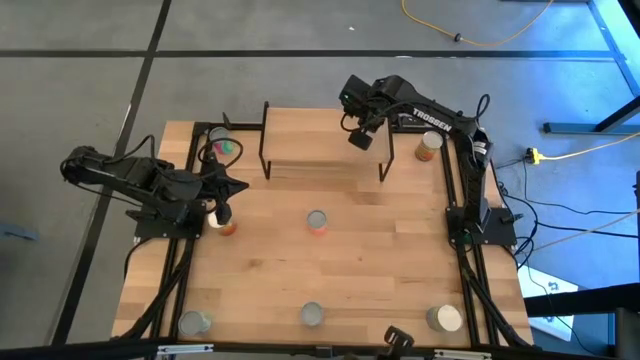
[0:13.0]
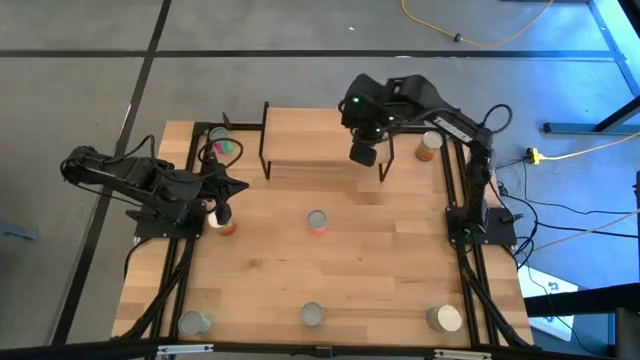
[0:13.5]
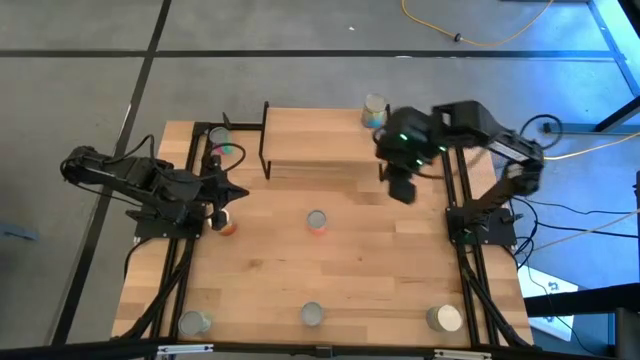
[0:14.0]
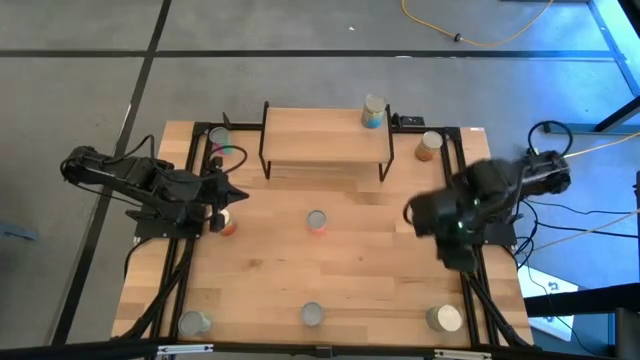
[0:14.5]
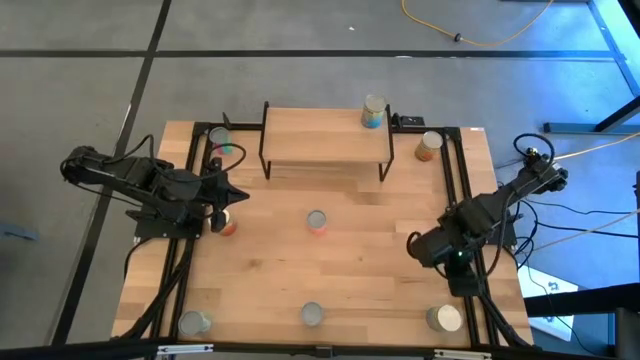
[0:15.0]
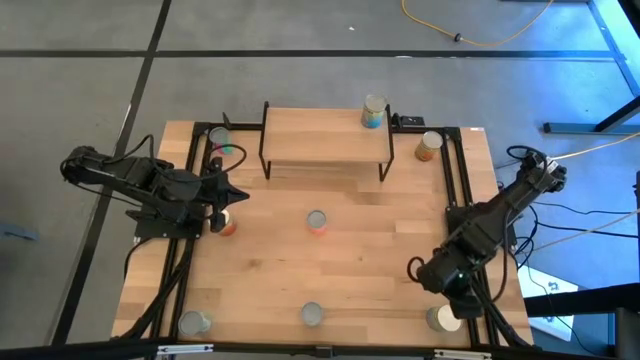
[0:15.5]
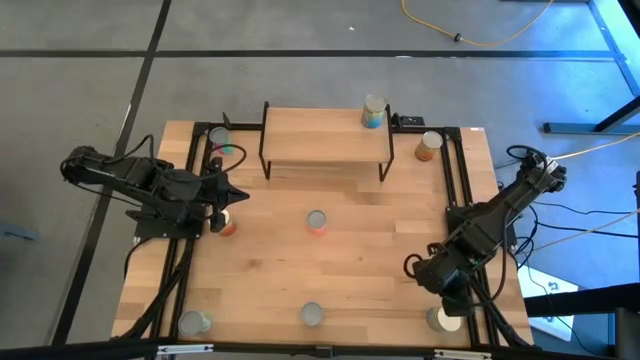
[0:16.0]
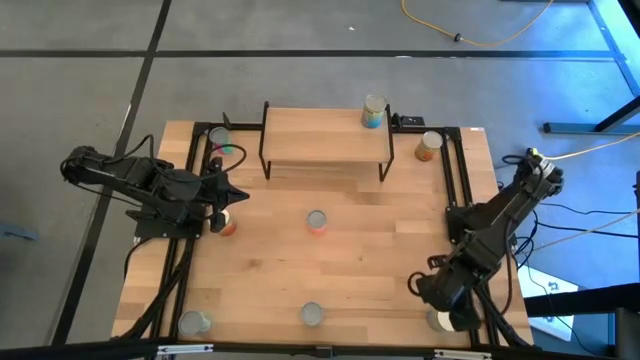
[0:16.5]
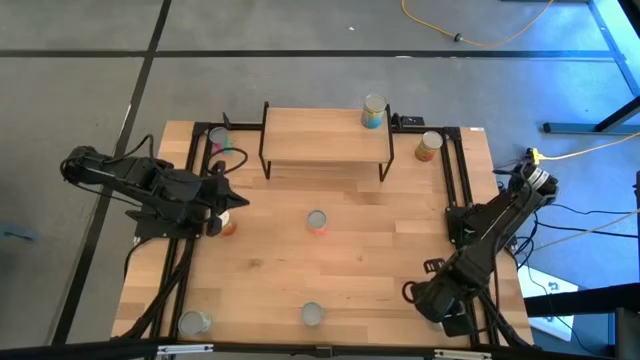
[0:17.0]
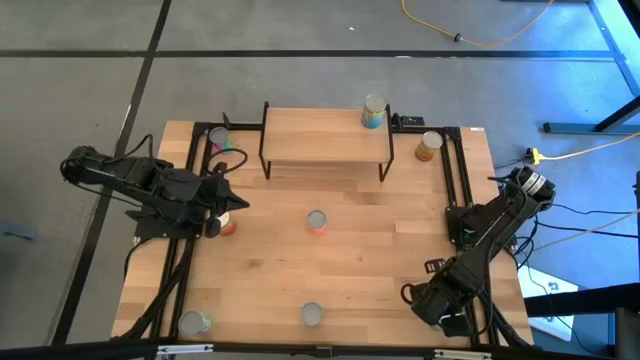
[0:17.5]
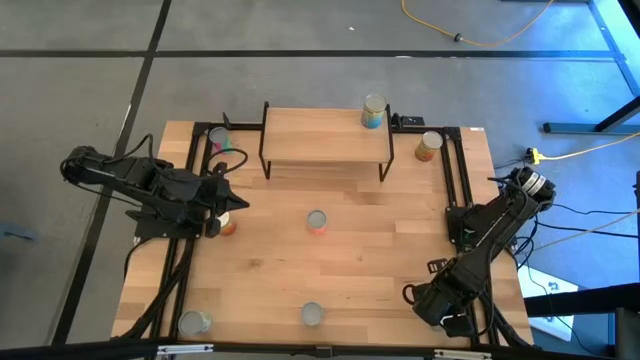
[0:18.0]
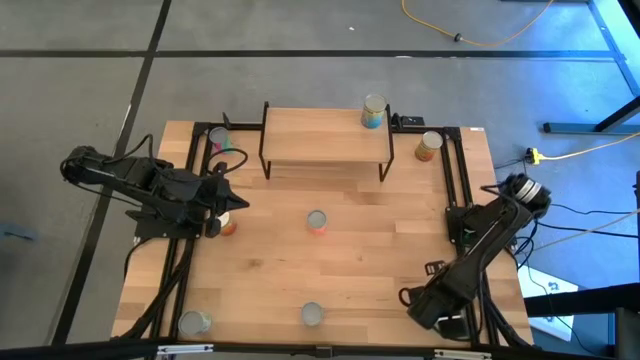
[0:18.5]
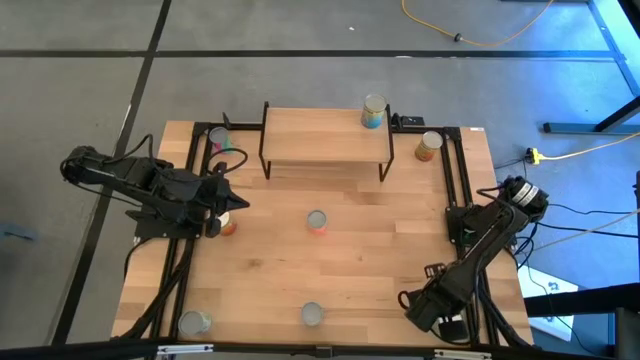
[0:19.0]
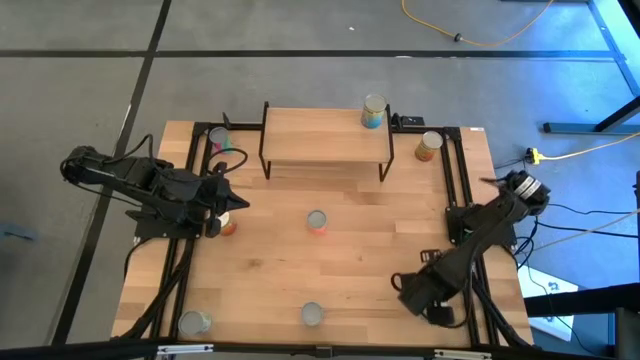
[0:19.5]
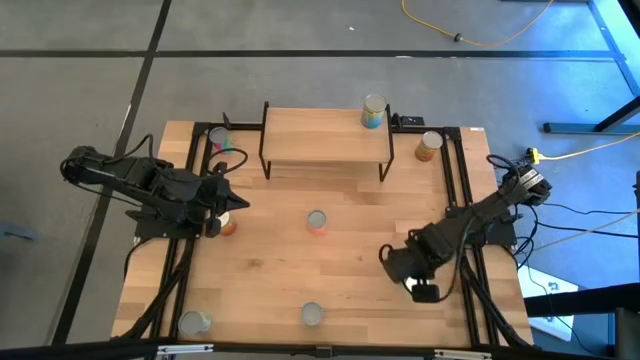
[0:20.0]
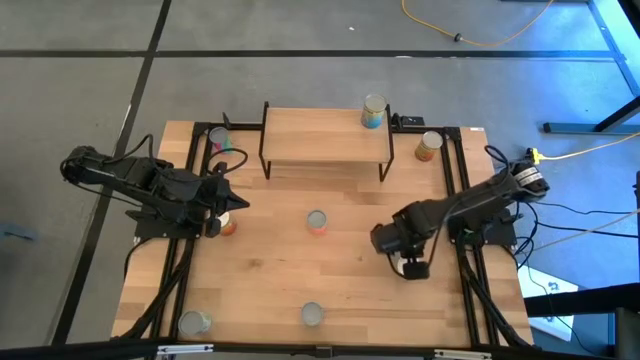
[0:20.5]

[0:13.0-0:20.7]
Task: Pick and place cans onto a shelf
Put the canned cherry on the shelf

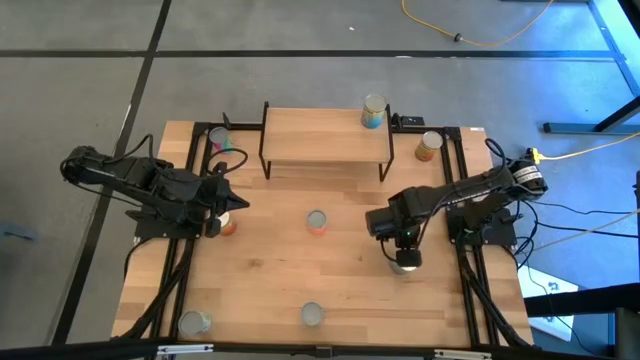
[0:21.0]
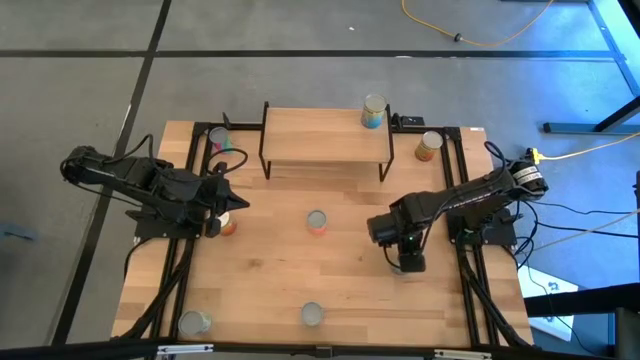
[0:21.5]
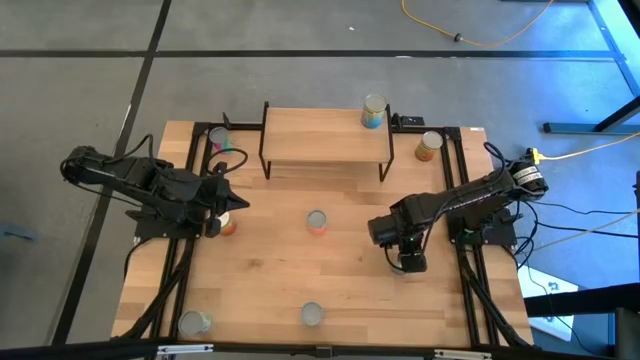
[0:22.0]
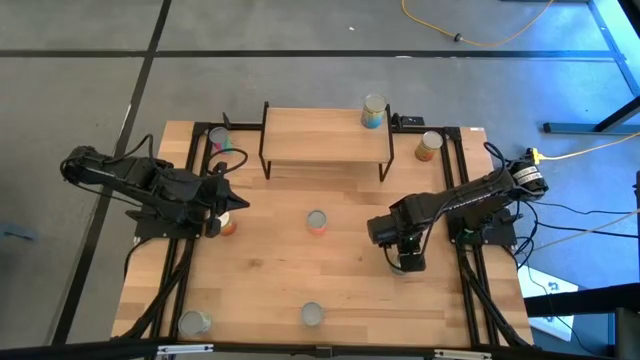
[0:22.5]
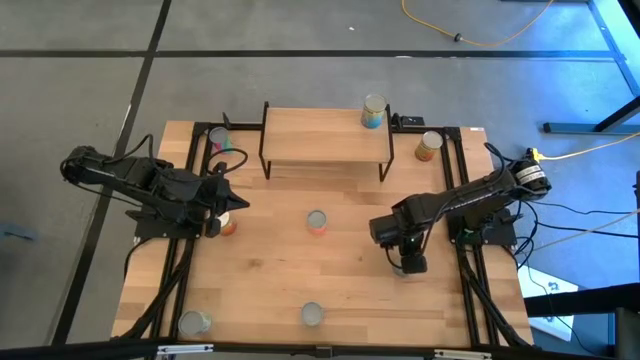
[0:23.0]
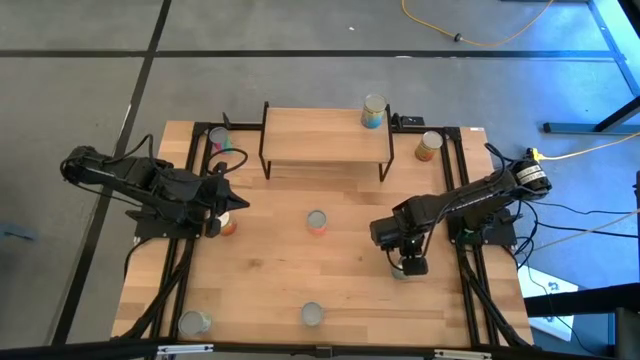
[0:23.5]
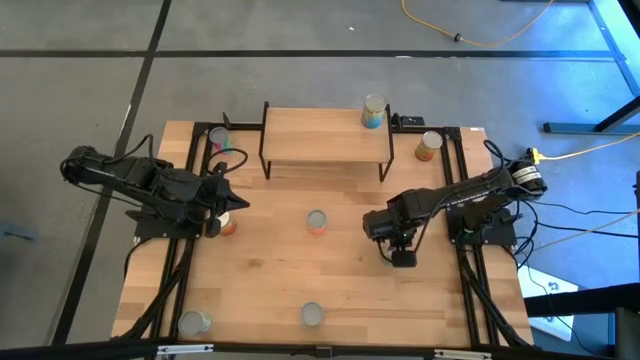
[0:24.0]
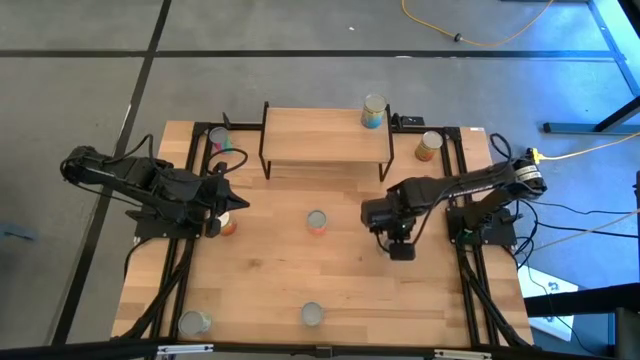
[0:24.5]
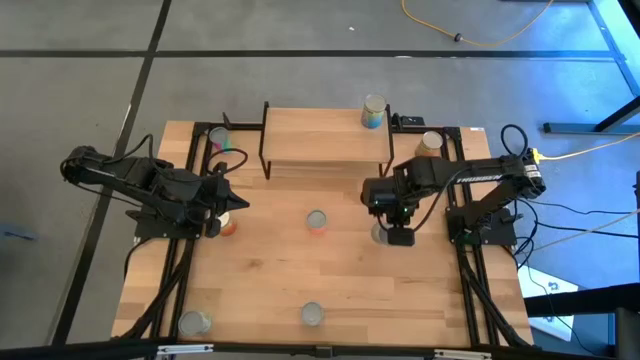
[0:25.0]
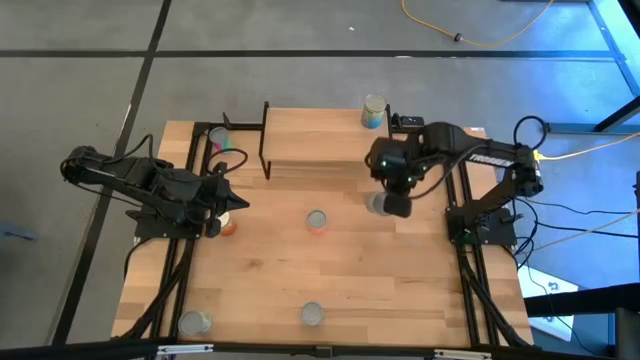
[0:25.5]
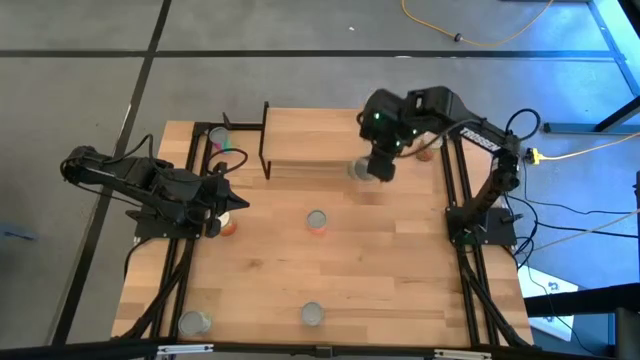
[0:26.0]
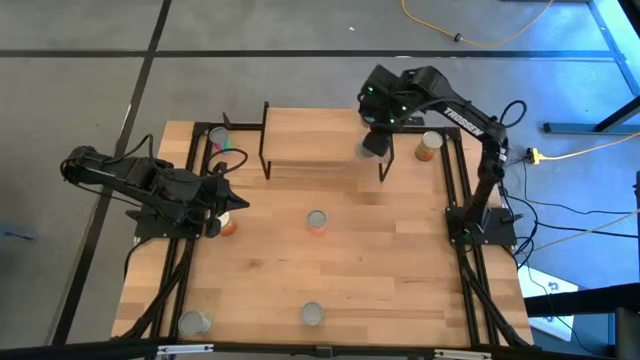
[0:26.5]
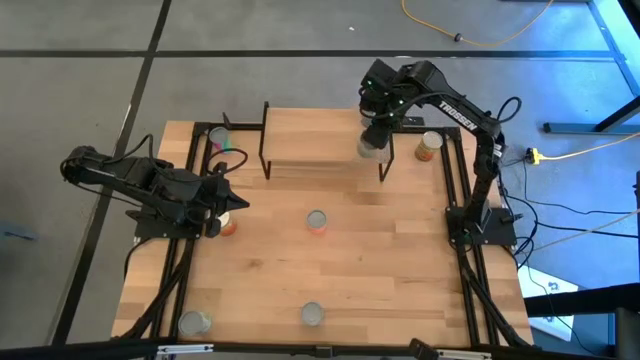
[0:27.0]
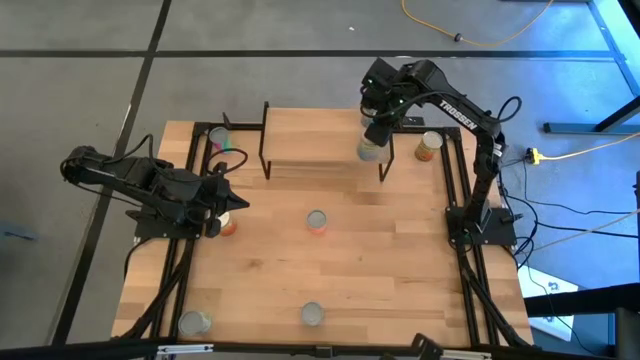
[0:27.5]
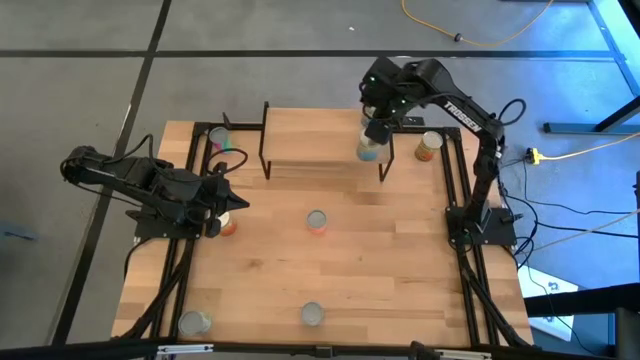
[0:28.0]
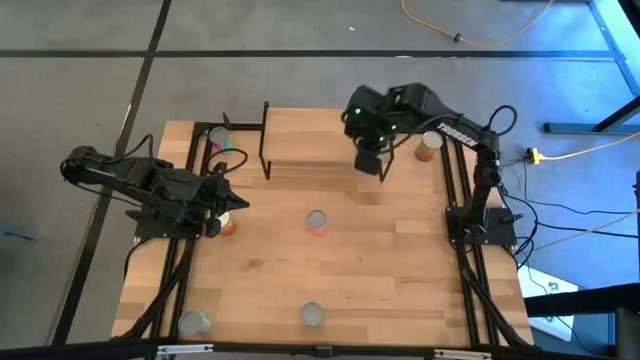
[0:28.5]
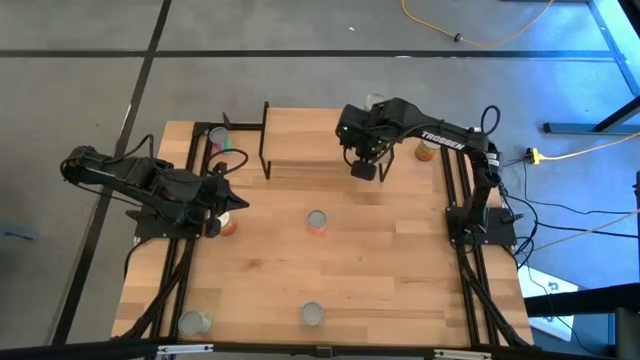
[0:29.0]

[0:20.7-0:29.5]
Put the canned cherry on the shelf

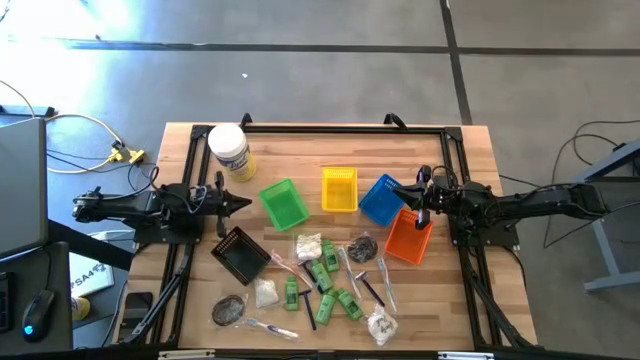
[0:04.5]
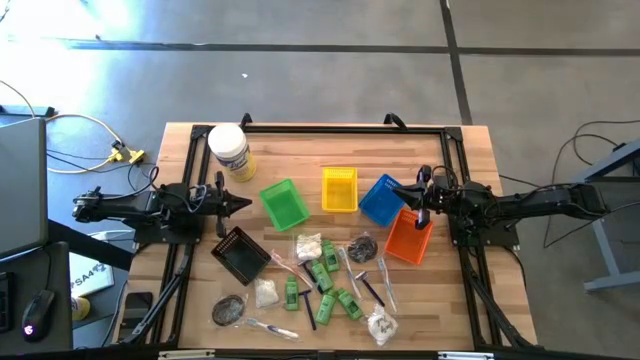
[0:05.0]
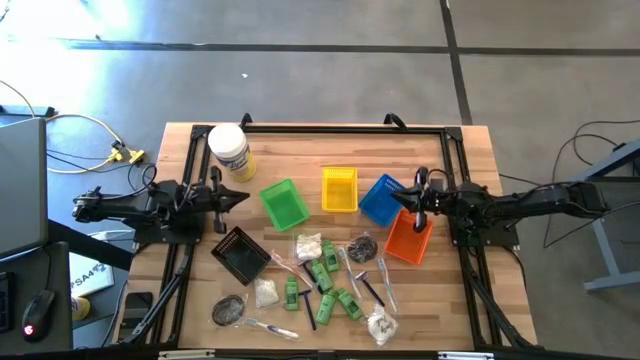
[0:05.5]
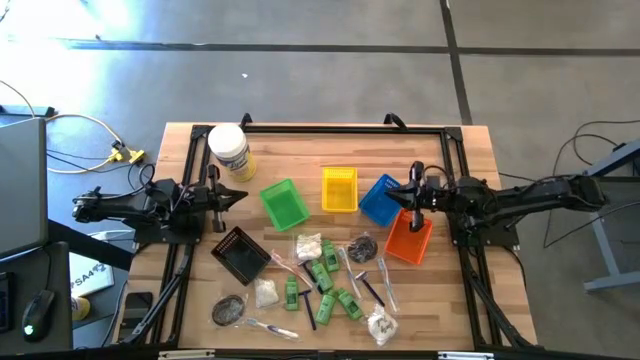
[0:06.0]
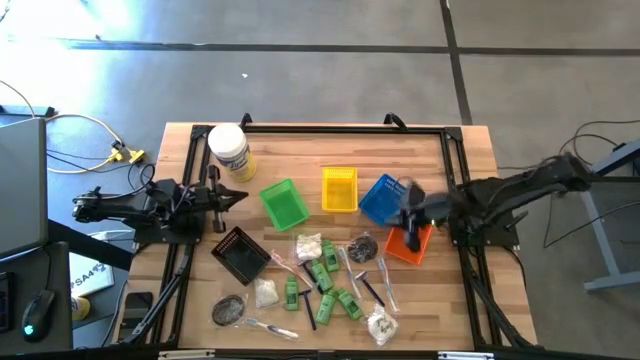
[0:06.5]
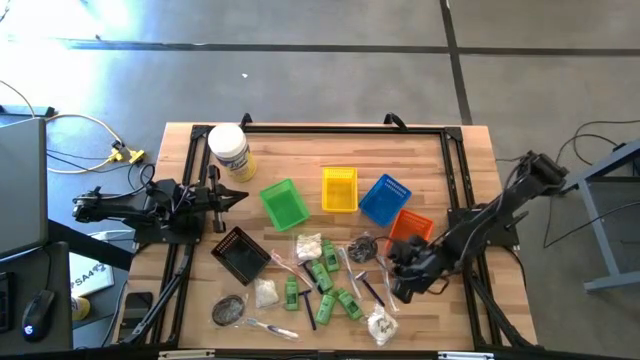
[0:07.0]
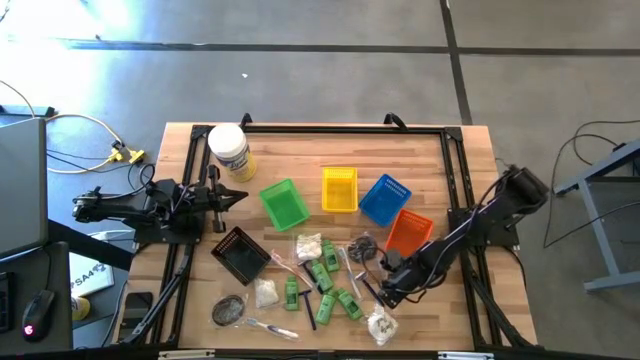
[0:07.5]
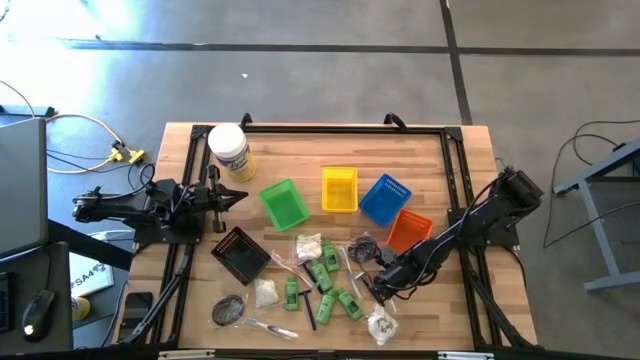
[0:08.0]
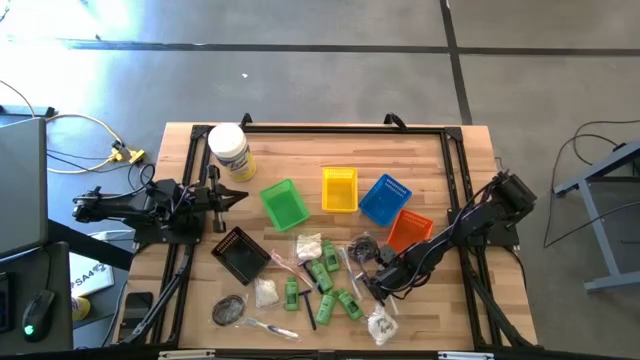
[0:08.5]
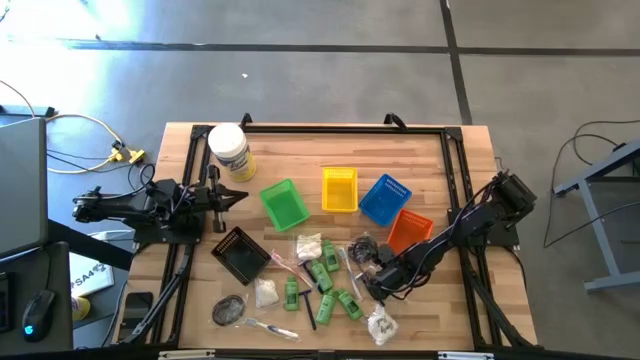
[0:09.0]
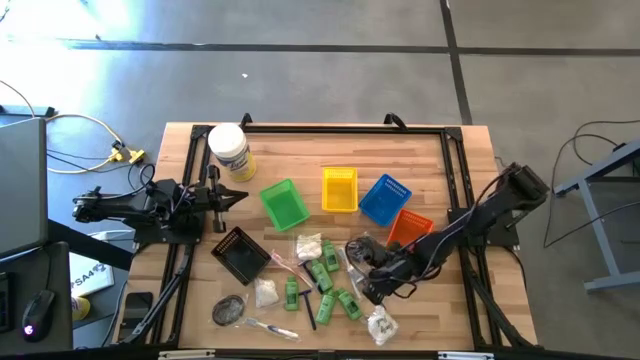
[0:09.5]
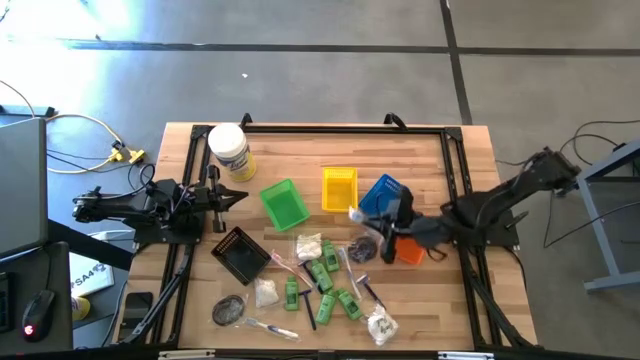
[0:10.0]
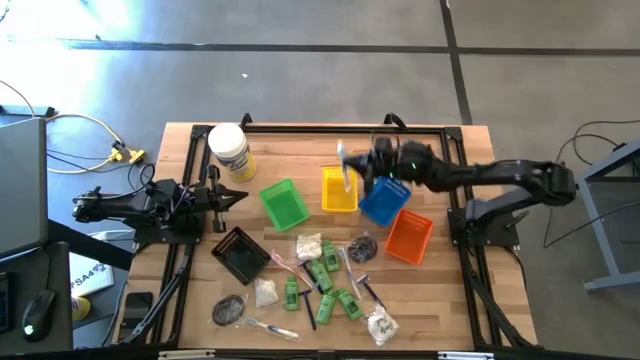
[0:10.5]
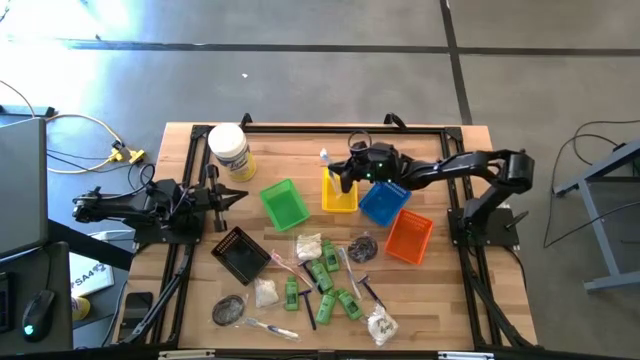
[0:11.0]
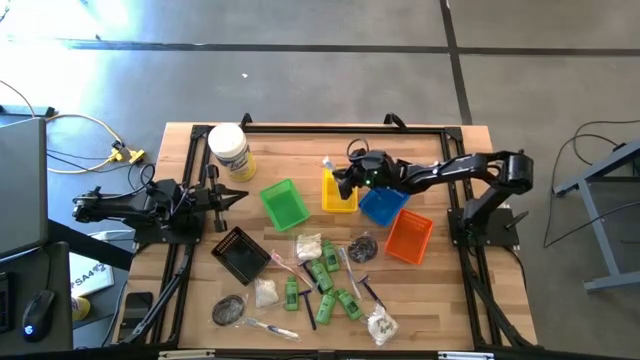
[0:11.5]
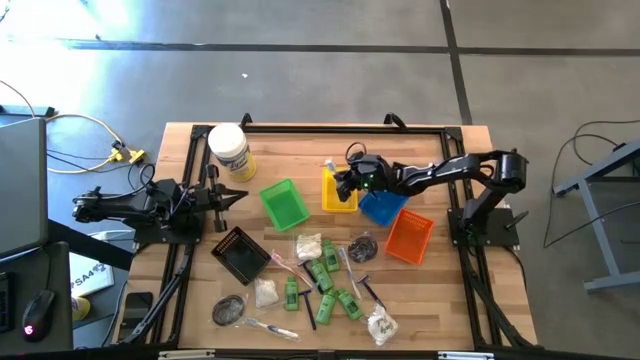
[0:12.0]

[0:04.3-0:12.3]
Task: Pick & Place Travel size toiletries
Put the right blue toothbrush into the yellow bin
